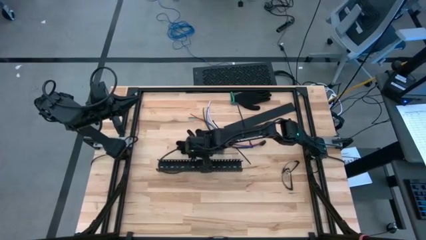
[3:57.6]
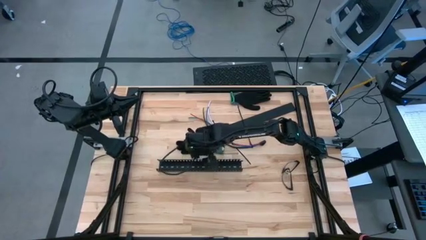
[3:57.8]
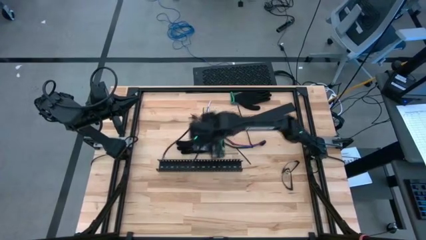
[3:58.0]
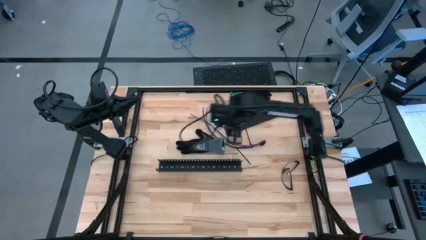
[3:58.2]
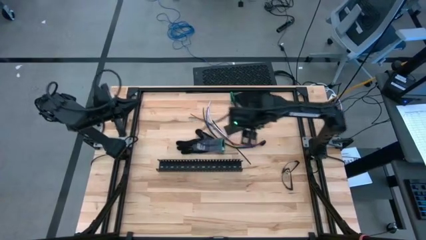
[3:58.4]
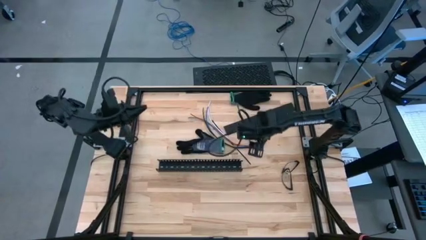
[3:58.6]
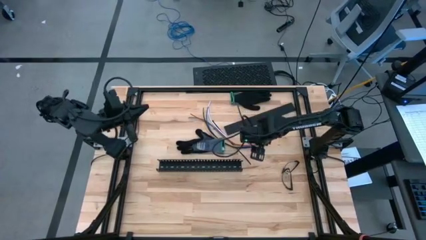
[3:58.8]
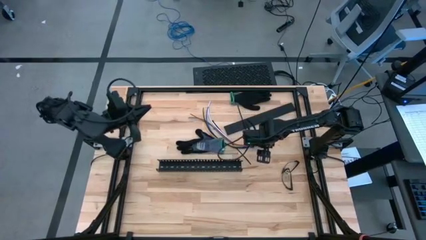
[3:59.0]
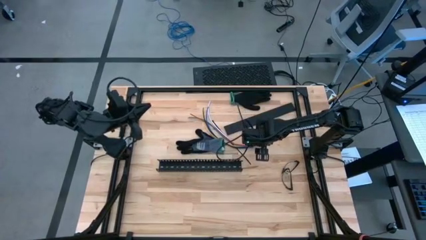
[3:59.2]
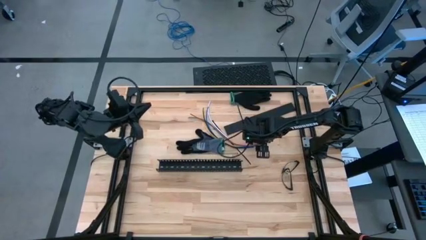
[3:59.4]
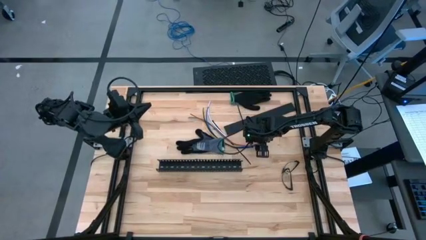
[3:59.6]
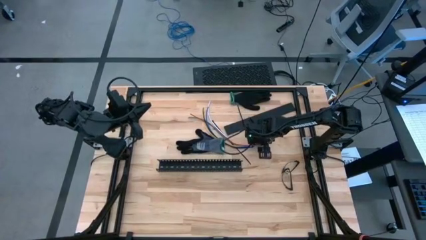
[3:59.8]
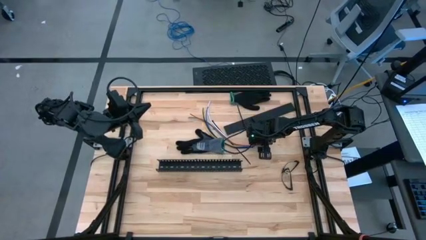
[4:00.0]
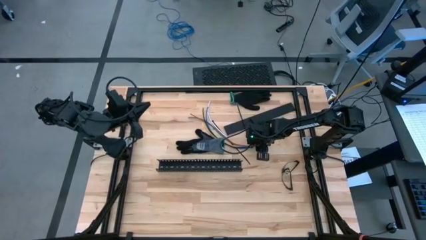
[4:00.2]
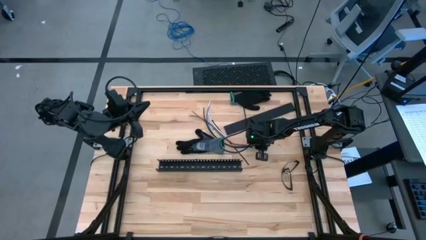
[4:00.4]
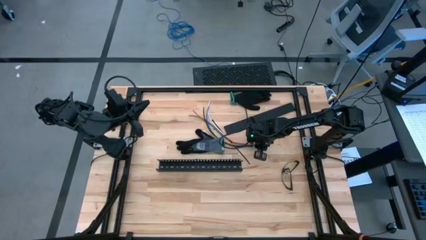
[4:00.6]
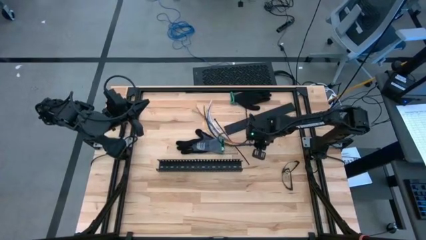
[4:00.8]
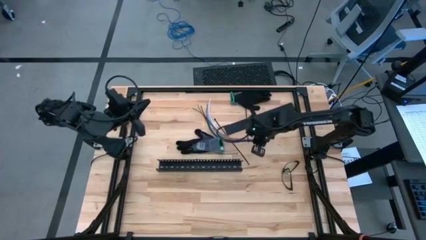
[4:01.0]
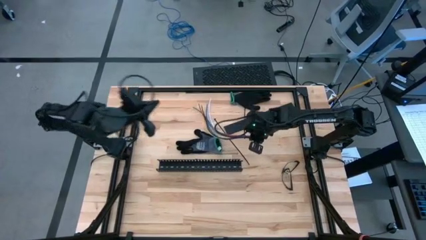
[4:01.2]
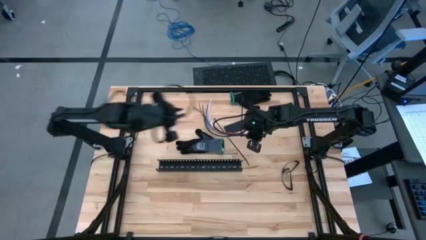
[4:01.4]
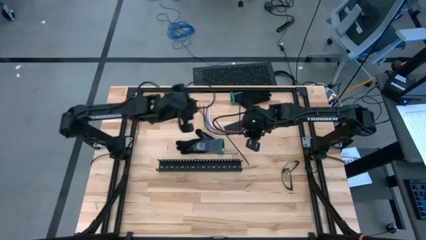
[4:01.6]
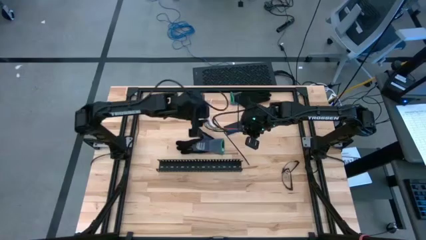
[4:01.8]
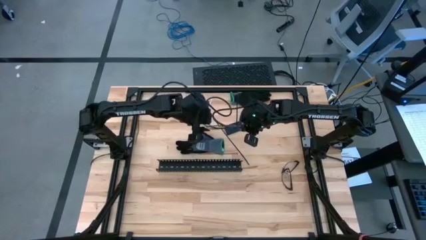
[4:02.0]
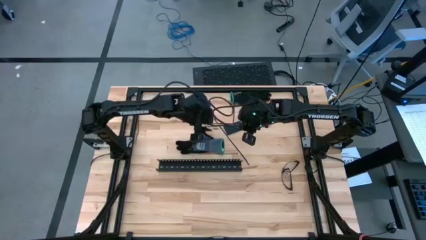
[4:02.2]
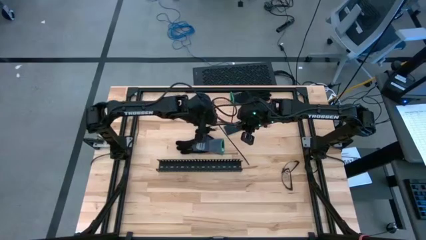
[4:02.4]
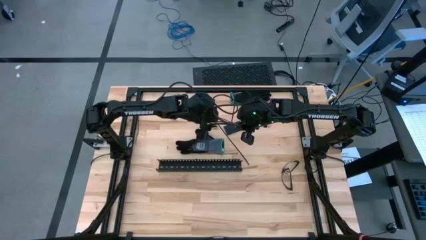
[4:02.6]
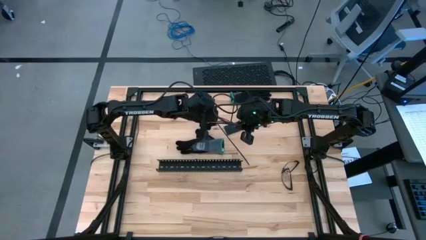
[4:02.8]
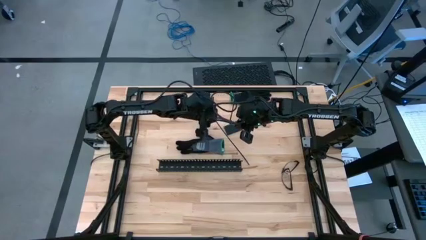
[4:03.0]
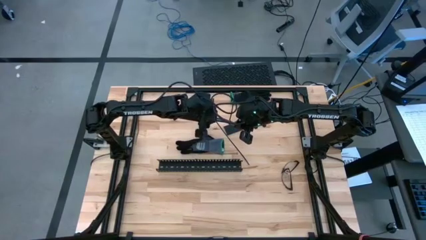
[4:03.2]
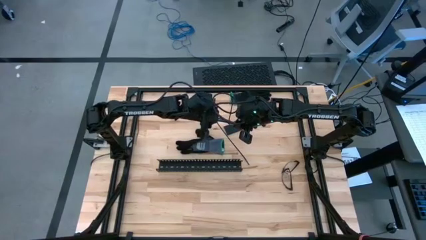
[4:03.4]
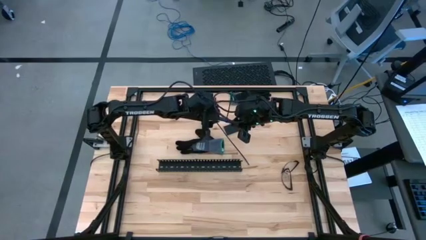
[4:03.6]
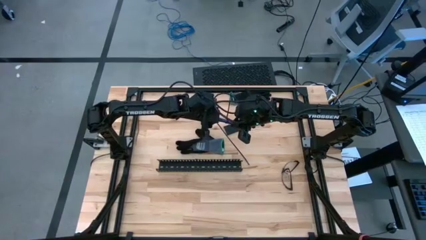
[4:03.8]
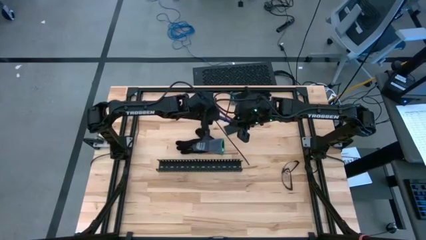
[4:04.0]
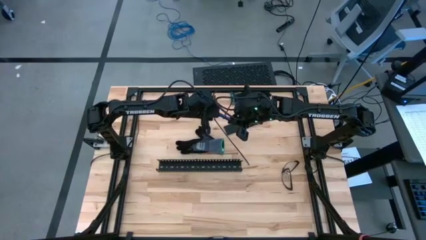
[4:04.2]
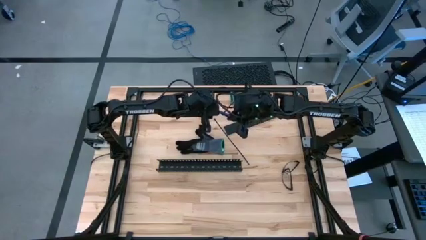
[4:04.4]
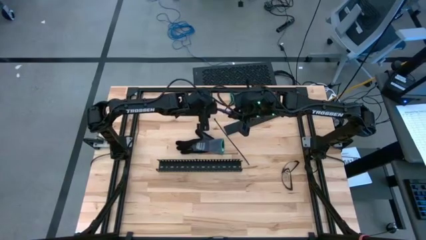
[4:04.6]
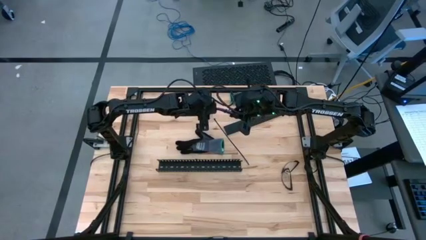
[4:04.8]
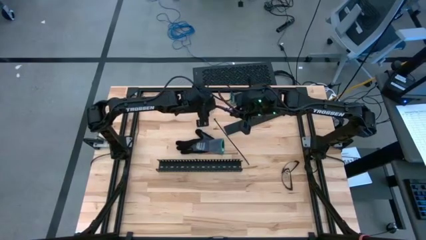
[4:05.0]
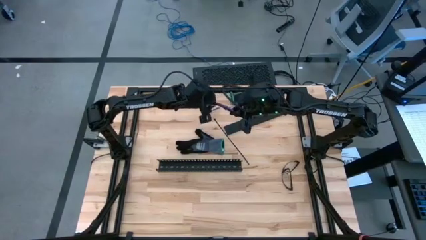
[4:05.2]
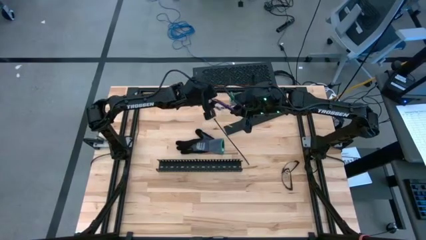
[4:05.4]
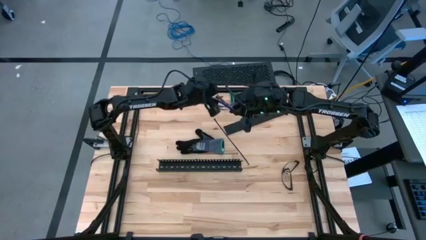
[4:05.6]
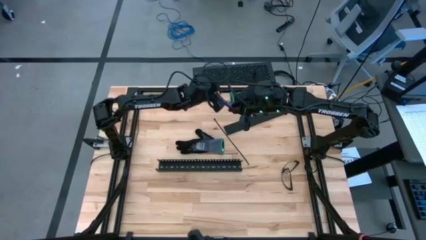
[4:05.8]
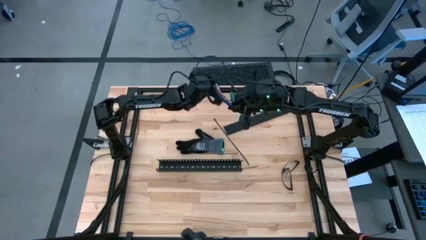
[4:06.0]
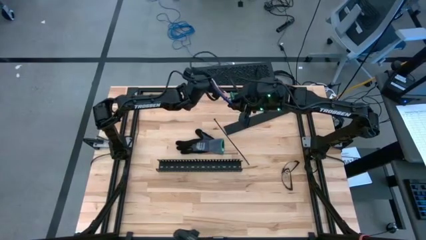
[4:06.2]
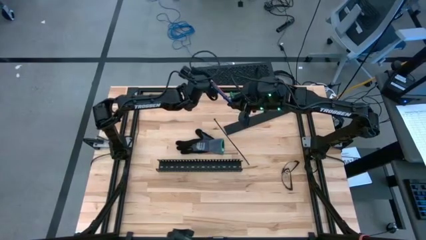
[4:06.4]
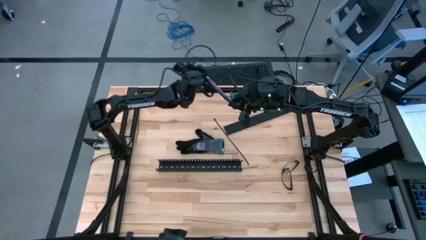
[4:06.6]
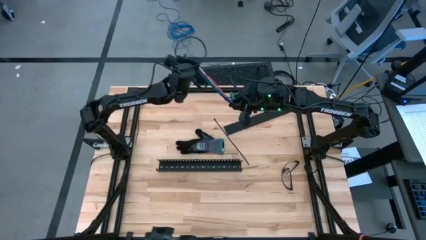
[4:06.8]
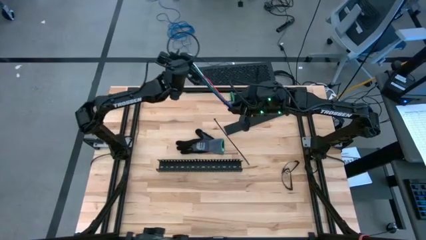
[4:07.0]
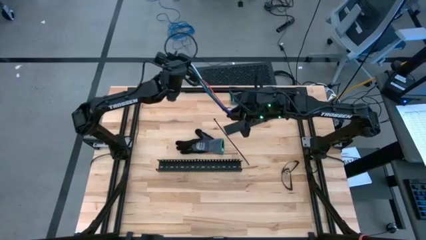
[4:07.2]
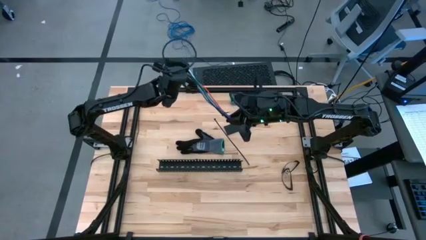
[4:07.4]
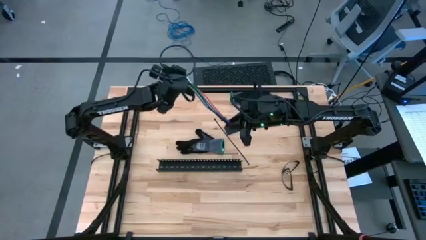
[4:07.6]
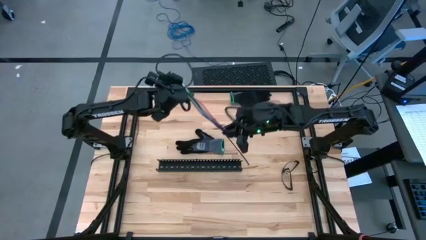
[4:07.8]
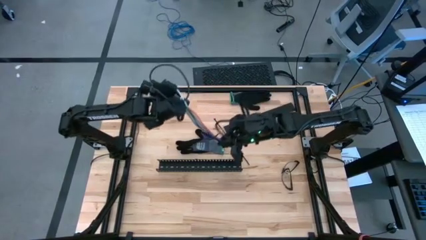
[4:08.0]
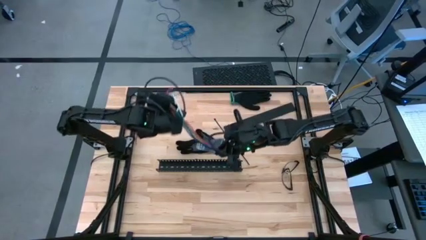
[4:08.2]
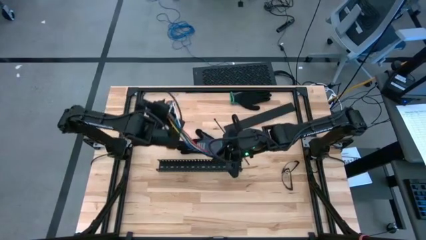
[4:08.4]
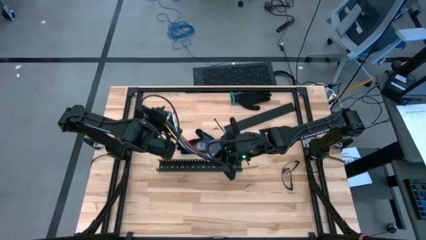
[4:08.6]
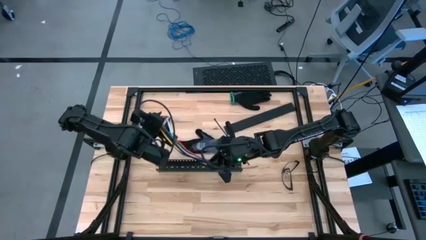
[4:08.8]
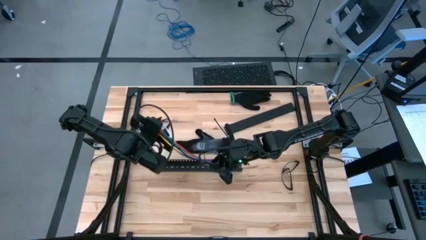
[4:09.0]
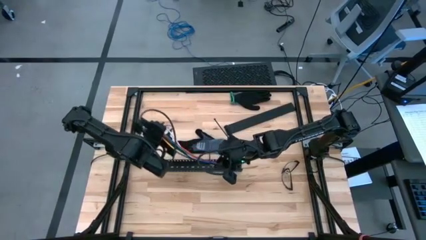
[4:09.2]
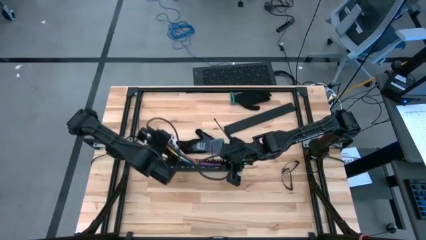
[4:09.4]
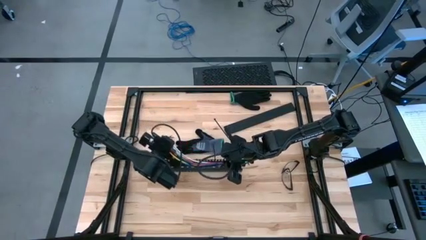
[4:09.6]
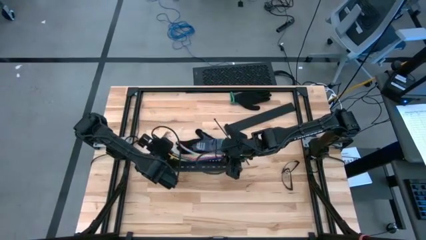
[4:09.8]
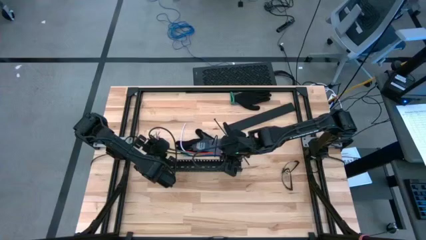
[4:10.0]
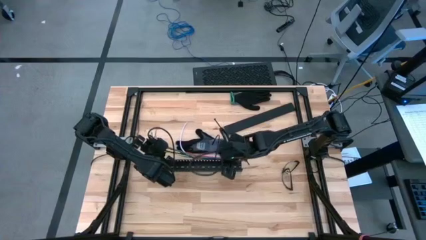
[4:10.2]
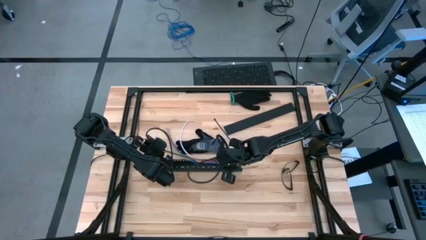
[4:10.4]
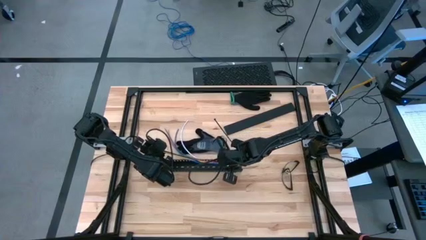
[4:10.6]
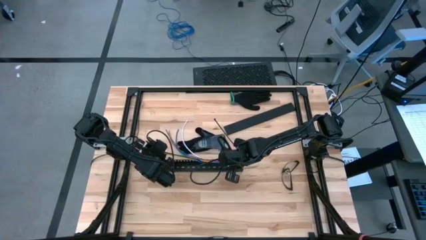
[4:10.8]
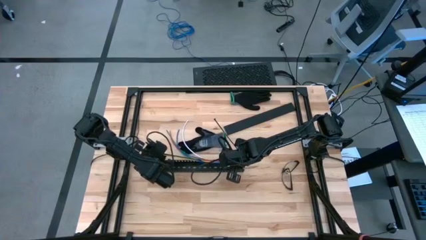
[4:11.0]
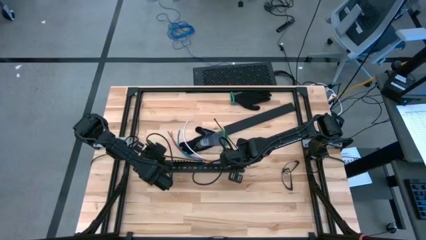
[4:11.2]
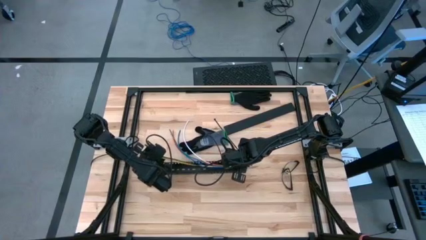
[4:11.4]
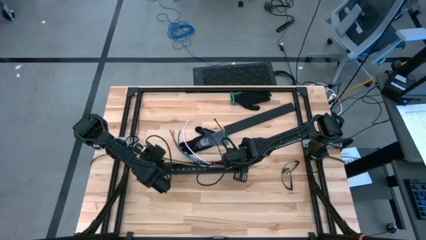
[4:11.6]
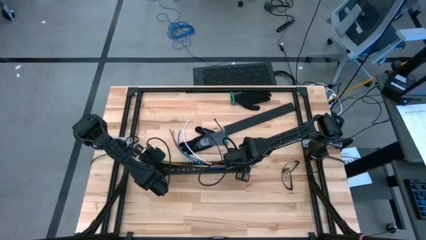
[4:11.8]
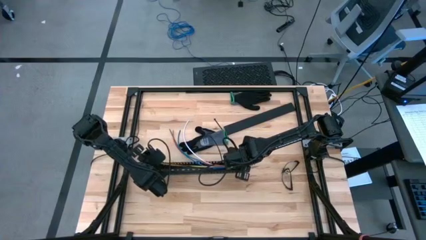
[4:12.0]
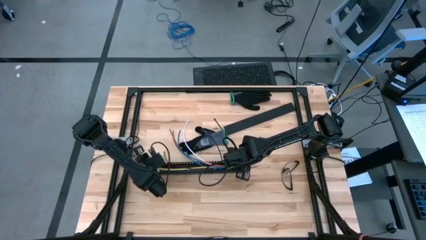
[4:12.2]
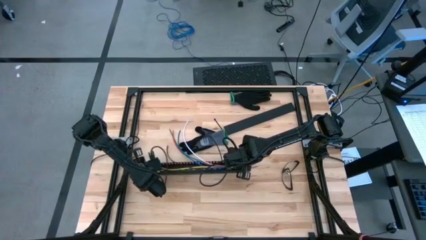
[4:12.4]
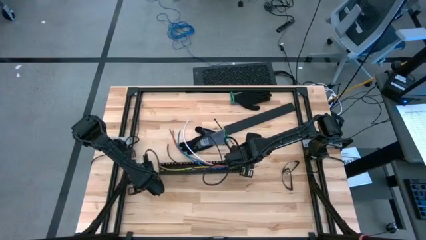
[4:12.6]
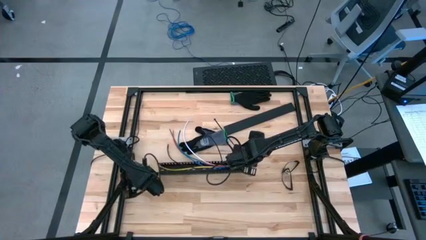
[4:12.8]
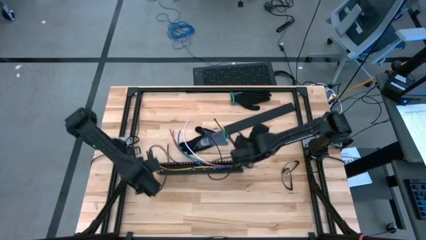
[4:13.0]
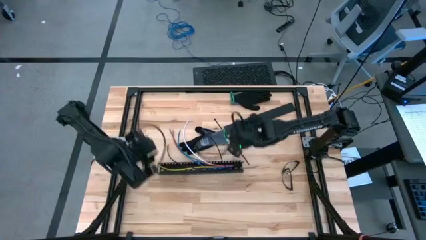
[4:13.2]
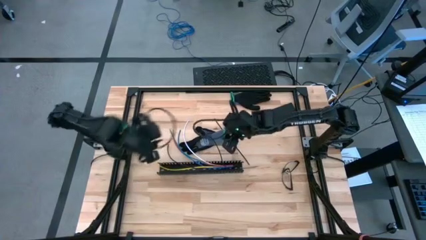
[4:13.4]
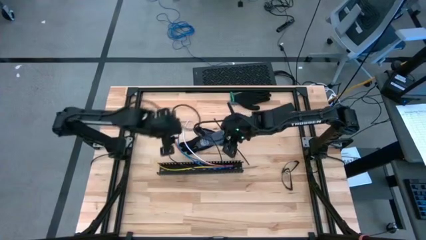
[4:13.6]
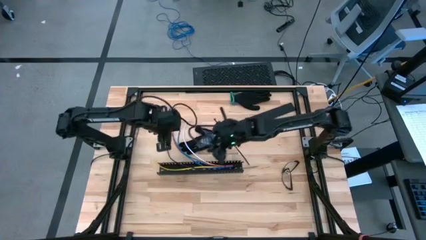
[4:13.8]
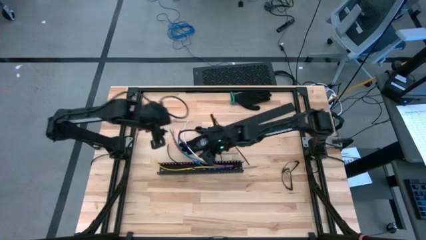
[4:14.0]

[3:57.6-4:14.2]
Task: Ziptie cables
Put the zip tied cable wires into the black cable duct
